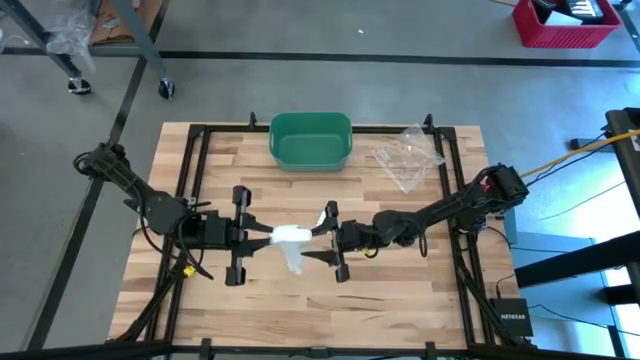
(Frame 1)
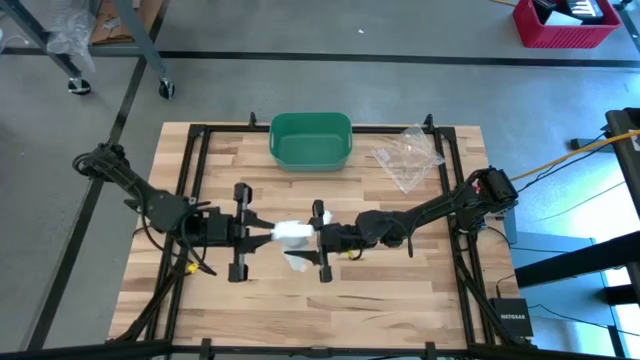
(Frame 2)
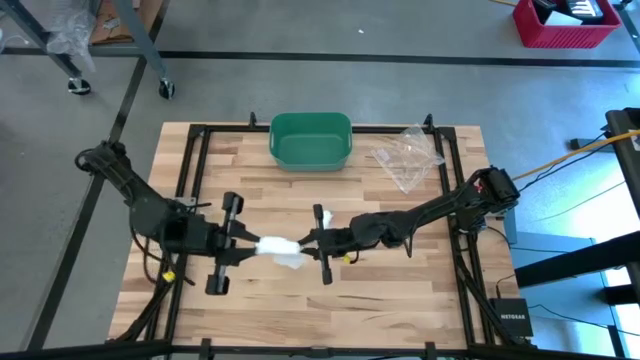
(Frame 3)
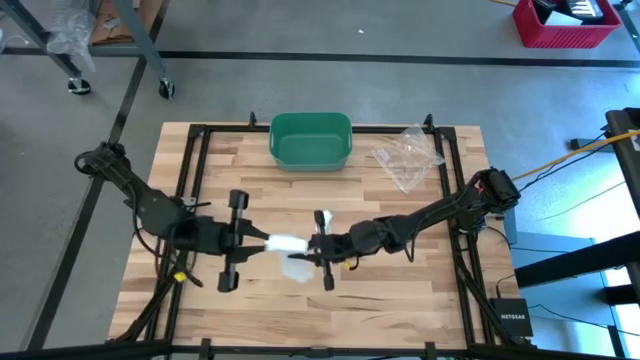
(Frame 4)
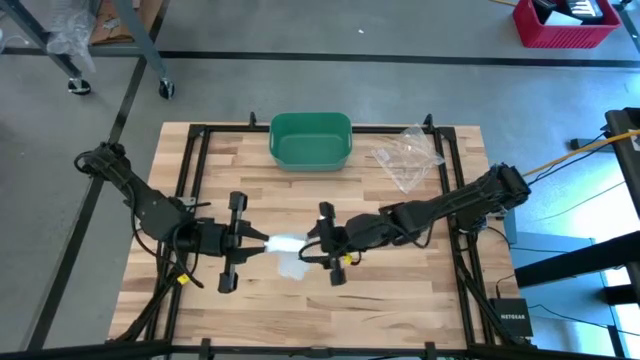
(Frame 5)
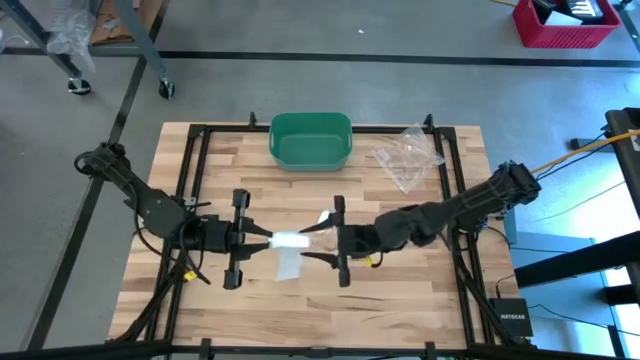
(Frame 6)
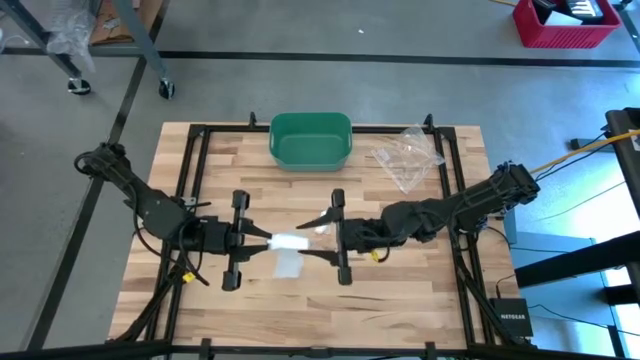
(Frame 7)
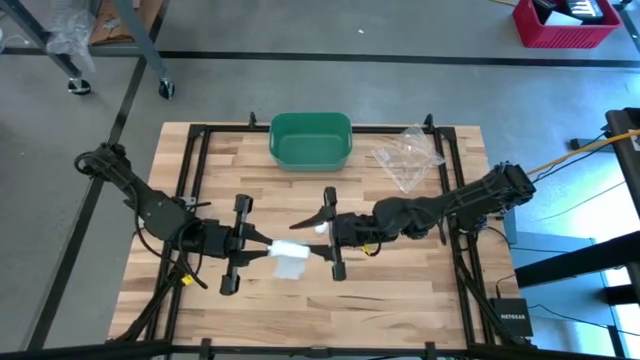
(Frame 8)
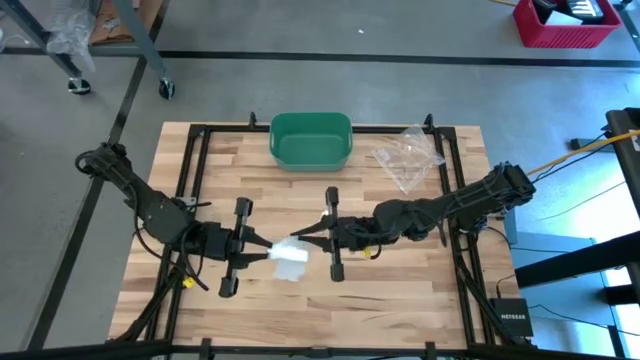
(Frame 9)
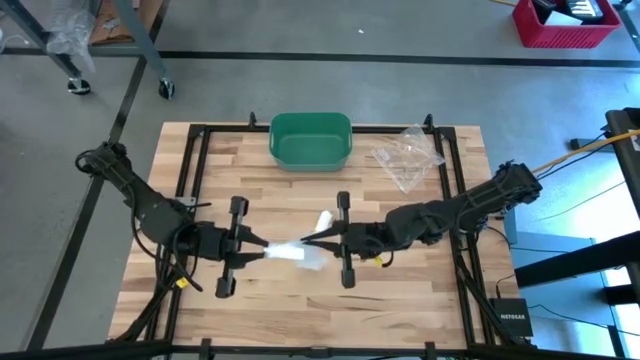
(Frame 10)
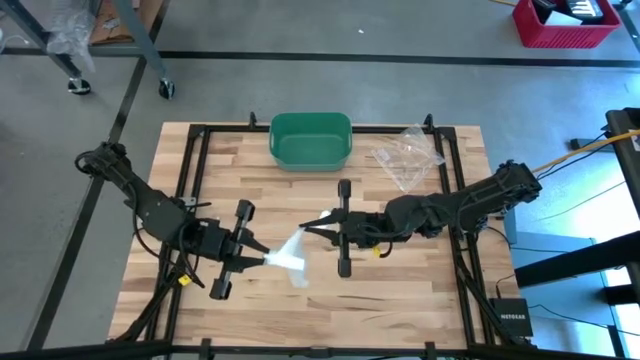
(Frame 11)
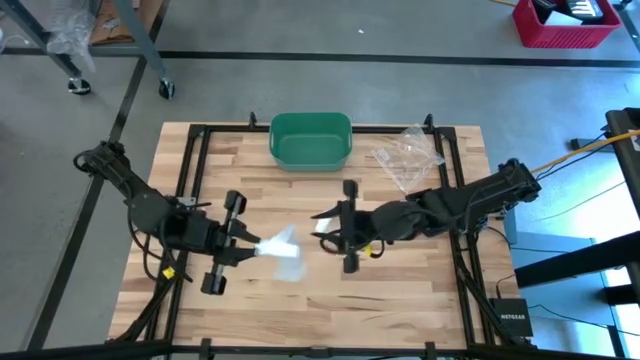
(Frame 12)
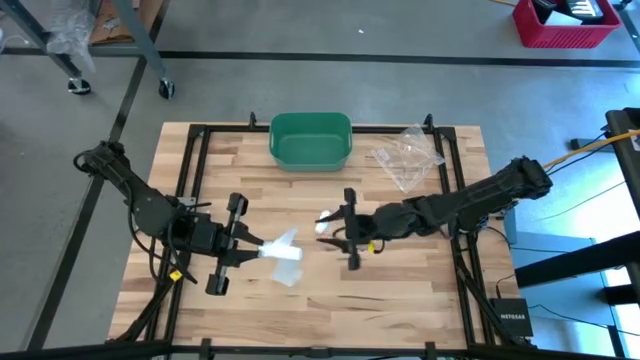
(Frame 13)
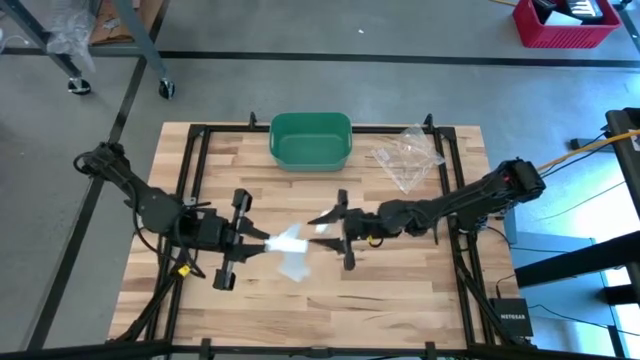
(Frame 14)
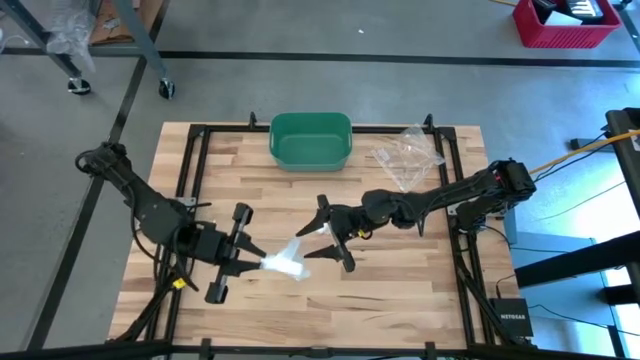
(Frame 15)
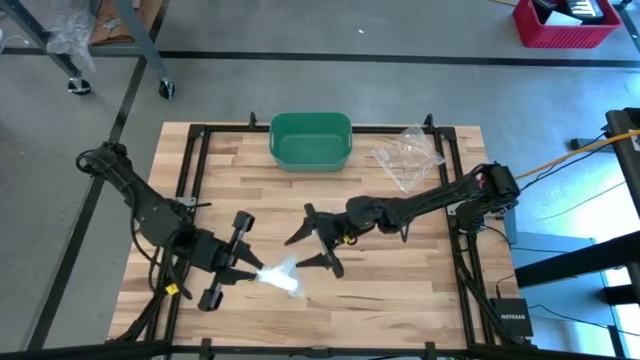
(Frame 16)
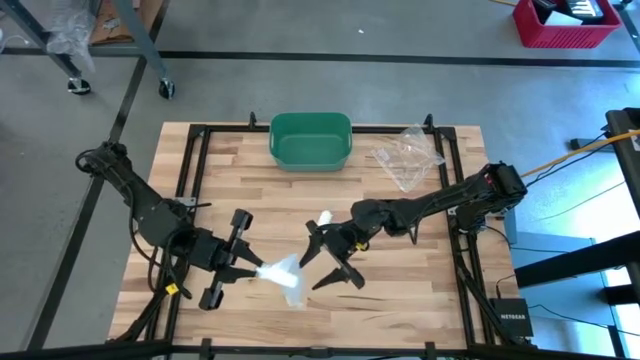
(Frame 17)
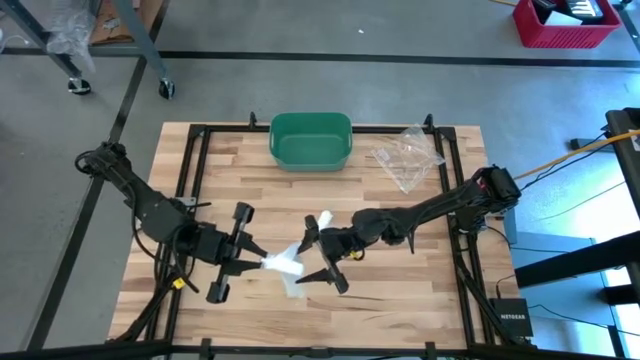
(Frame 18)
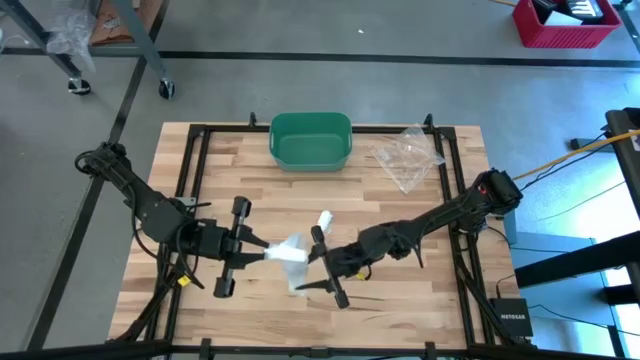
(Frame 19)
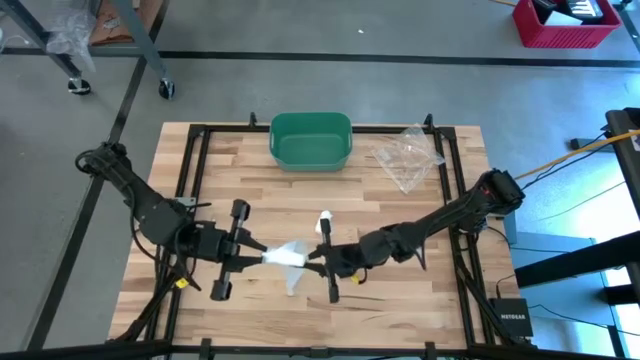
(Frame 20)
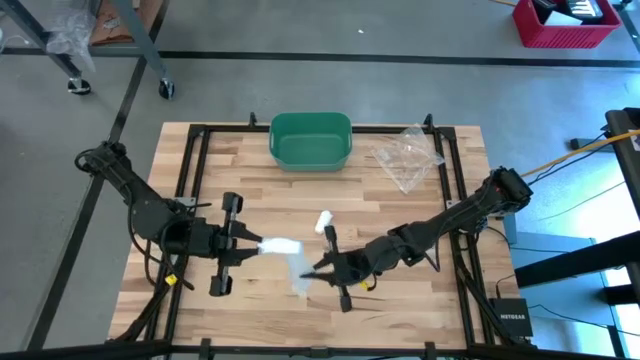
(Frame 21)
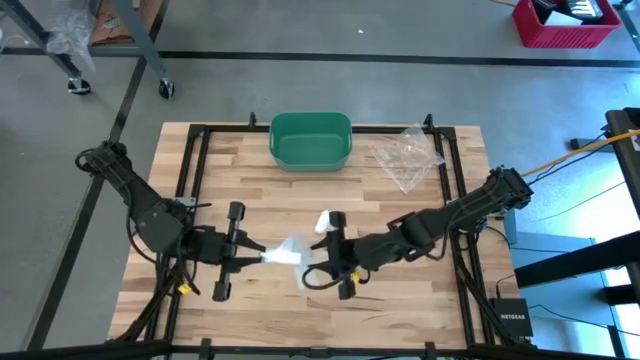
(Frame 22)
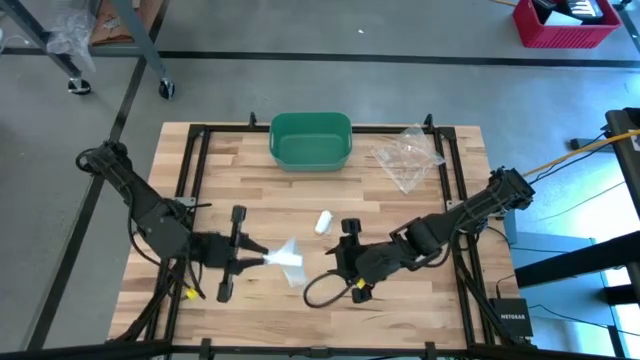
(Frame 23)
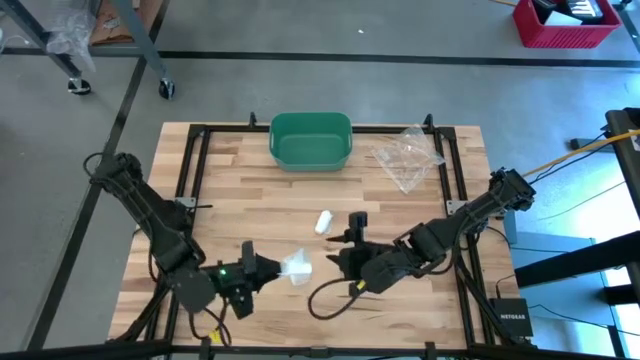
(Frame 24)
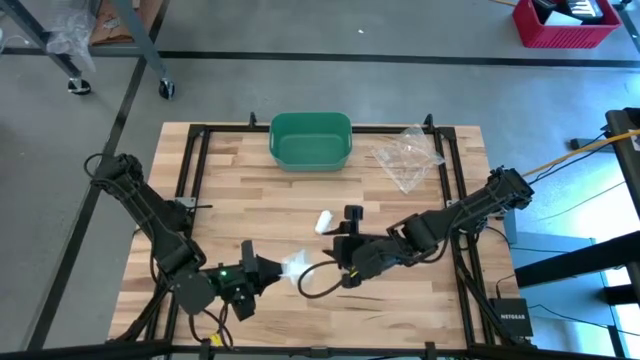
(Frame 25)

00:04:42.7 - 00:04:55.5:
Task: Roll bandage
Roll the bottom white bandage

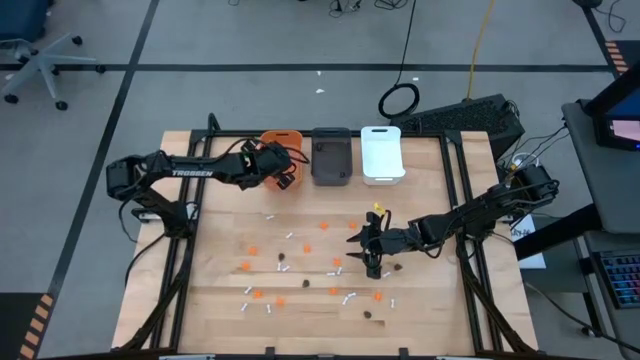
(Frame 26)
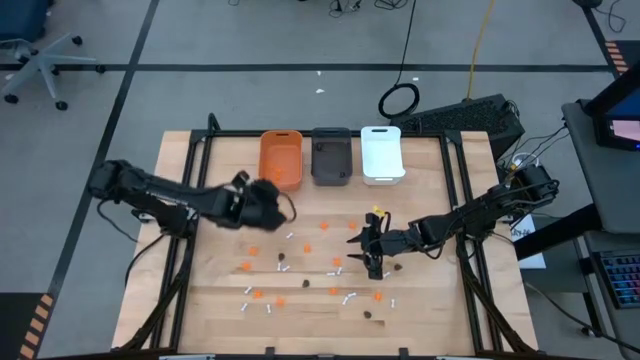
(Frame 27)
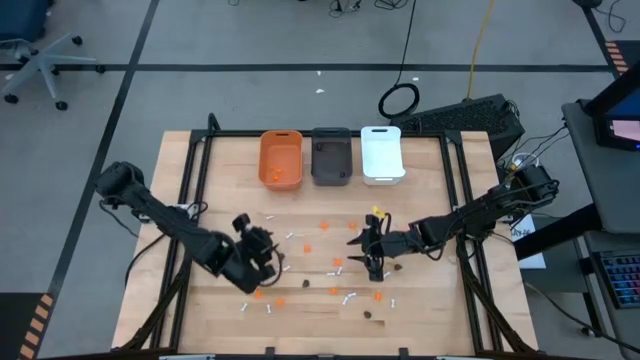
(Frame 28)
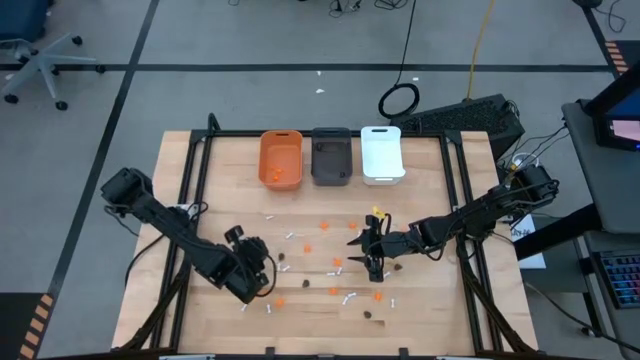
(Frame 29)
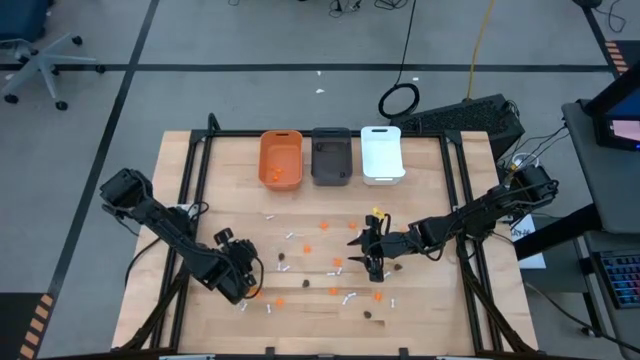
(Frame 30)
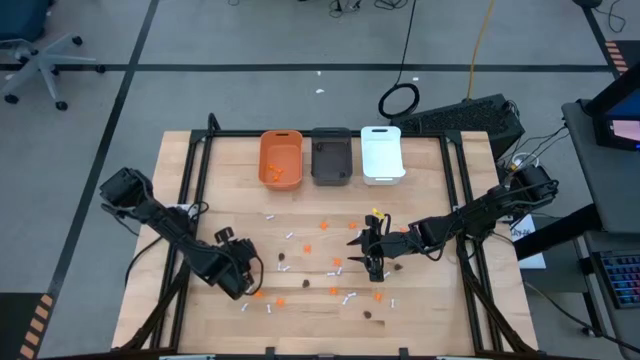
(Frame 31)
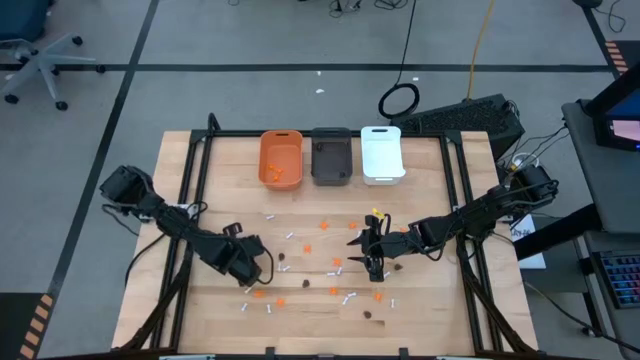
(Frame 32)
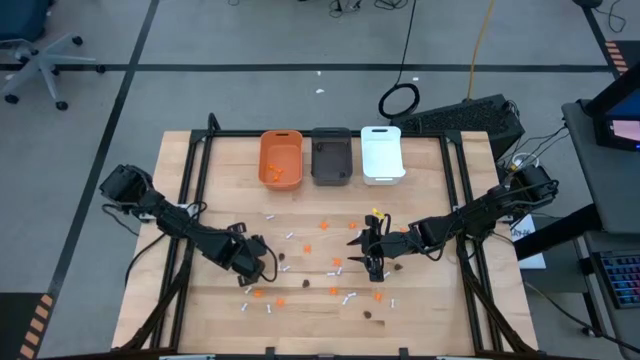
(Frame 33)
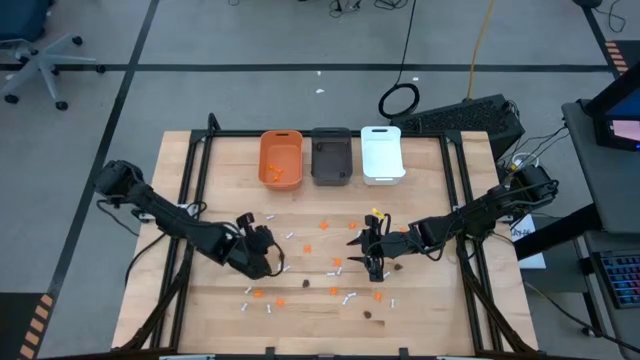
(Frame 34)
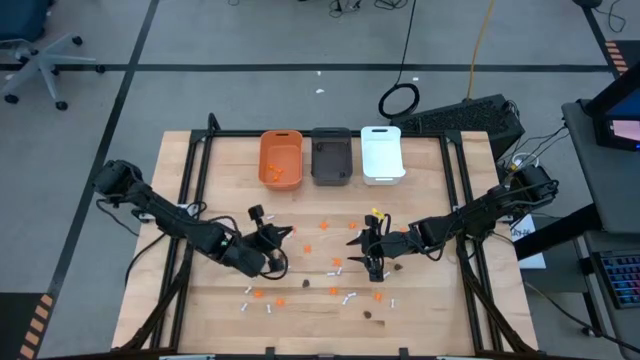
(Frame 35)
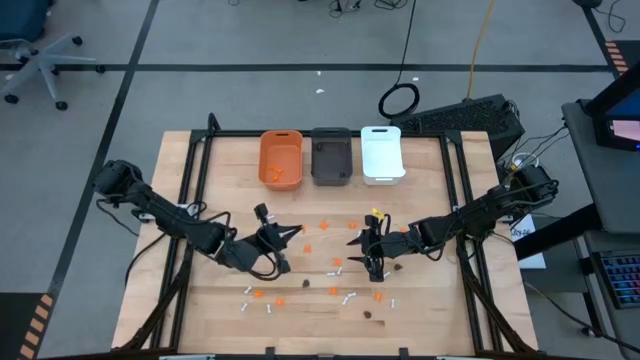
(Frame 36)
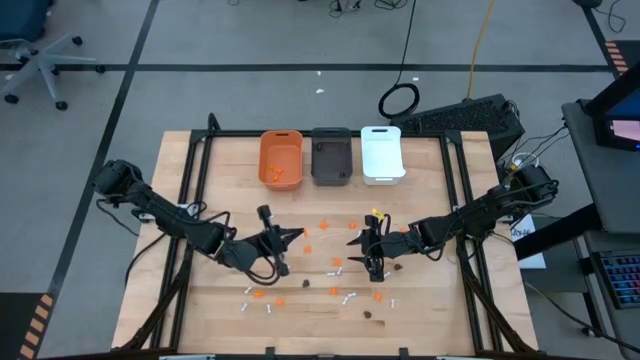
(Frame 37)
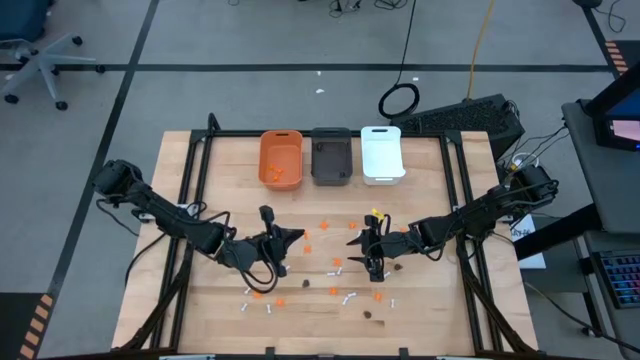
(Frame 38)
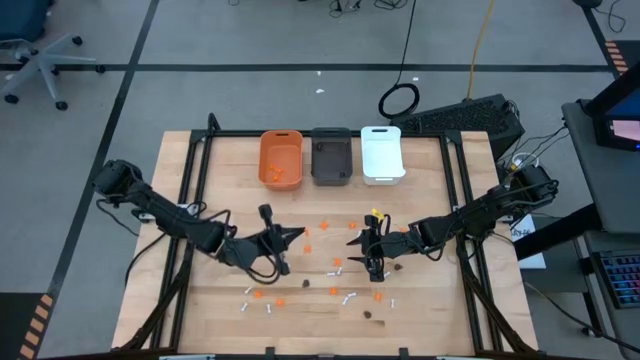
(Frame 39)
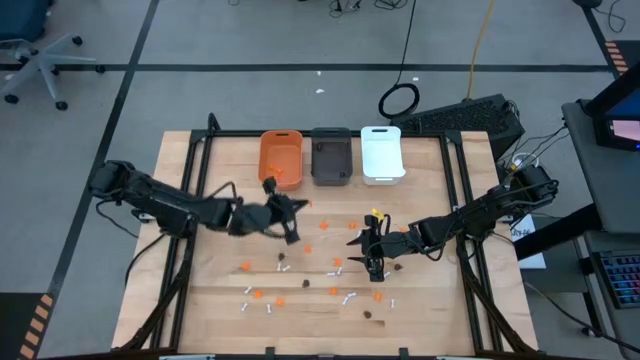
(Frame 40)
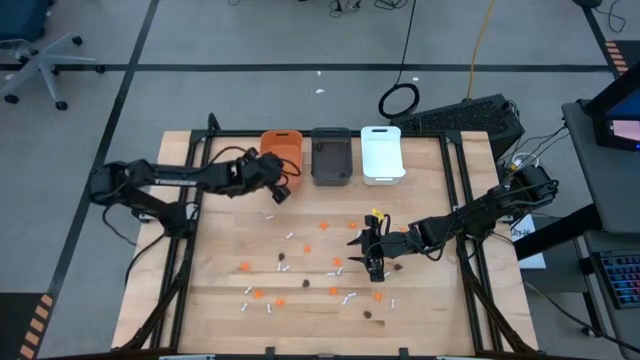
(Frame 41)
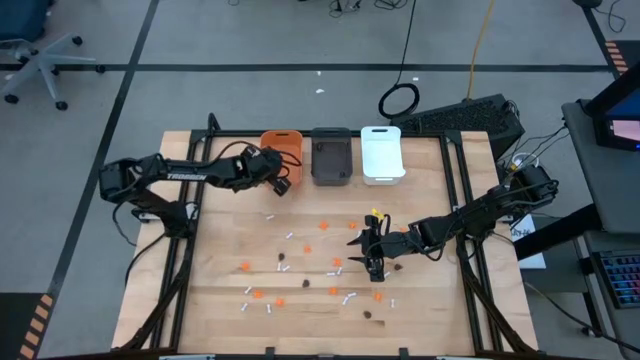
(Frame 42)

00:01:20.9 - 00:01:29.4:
Task: Sort Halloween decoration
Put the orange spider toy into the orange bin
